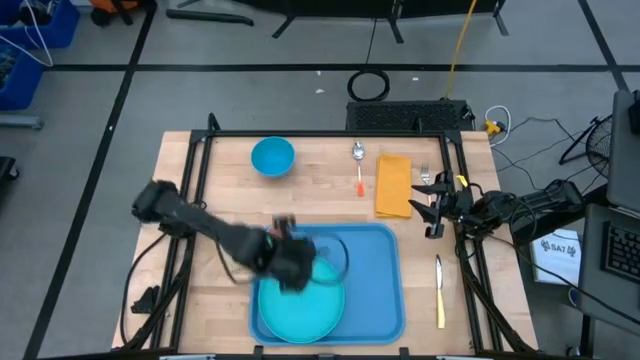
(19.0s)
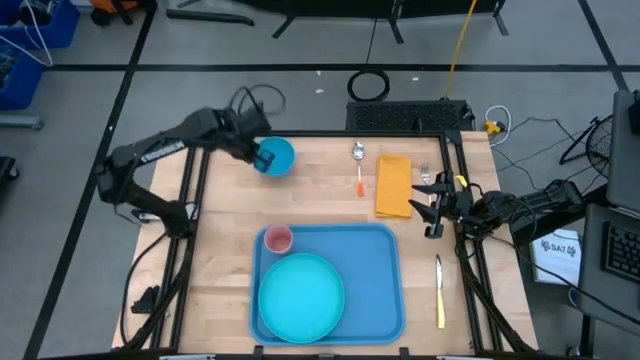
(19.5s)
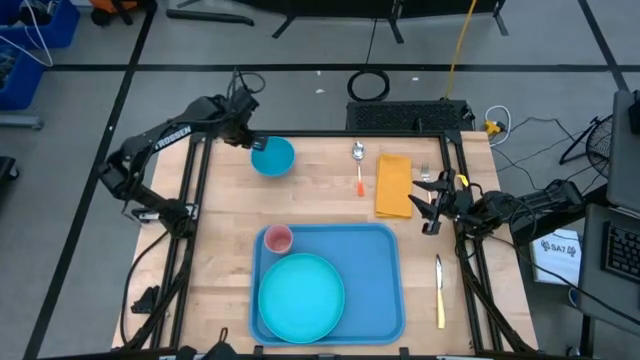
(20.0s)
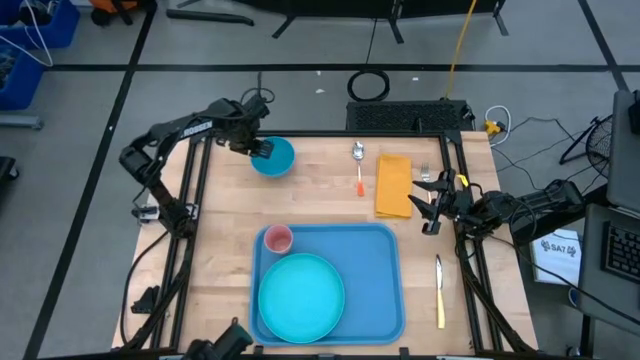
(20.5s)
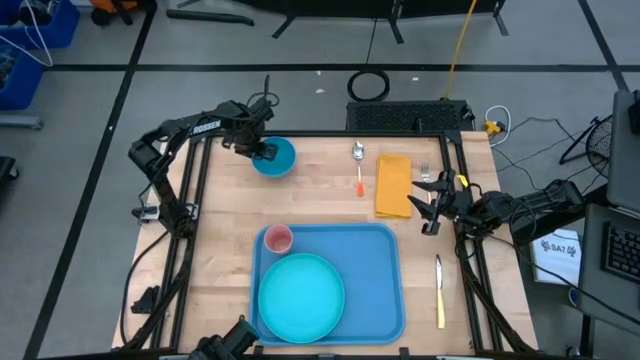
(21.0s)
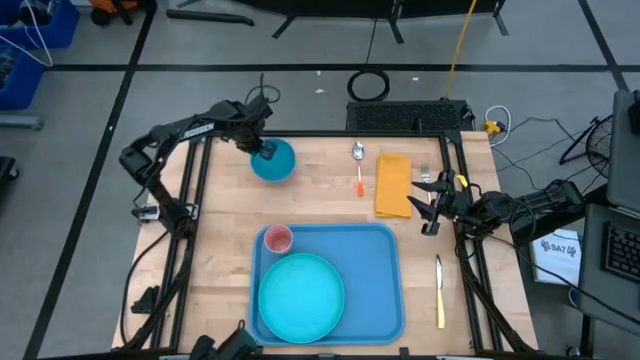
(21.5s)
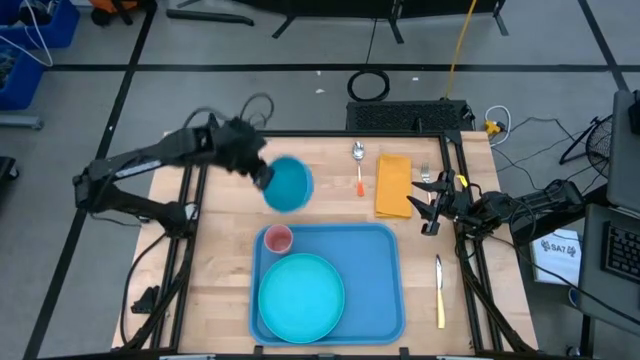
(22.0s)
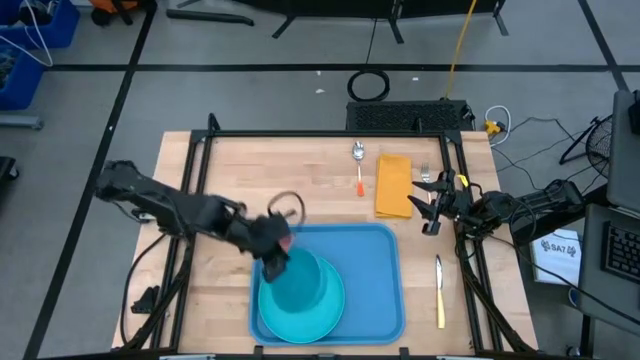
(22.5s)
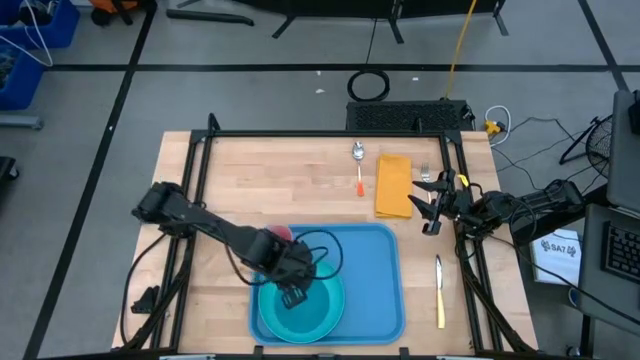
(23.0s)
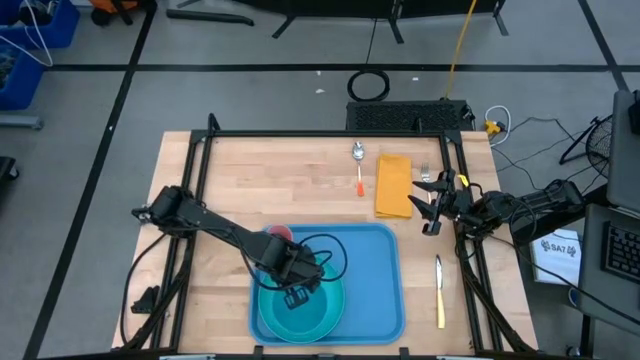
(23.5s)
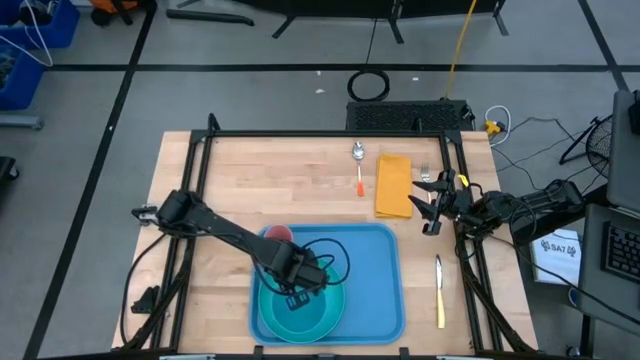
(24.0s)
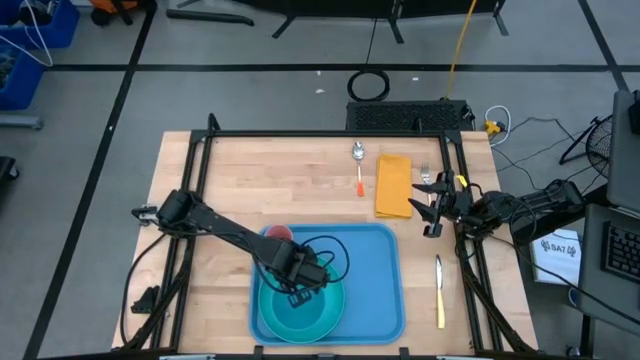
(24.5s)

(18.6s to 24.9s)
Task: Set up tray
Put the blue bowl on the light blue plate

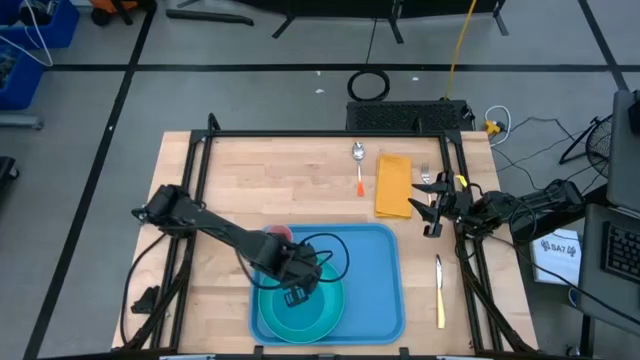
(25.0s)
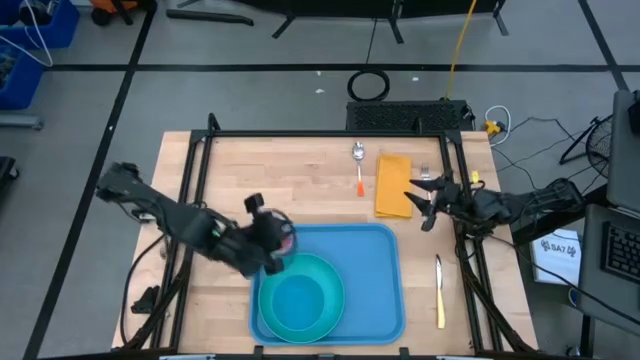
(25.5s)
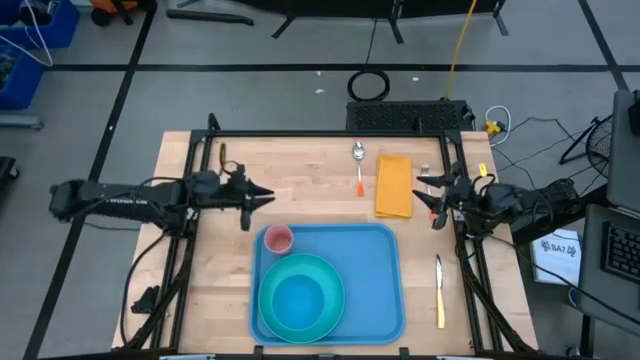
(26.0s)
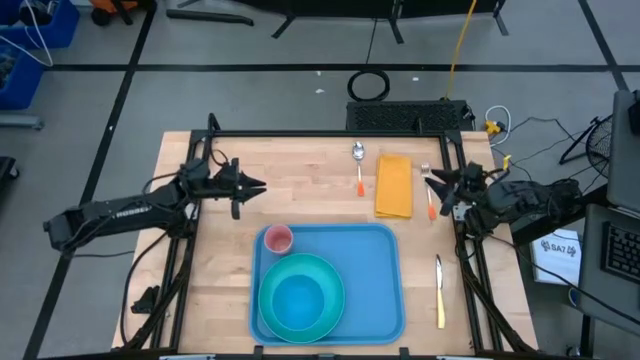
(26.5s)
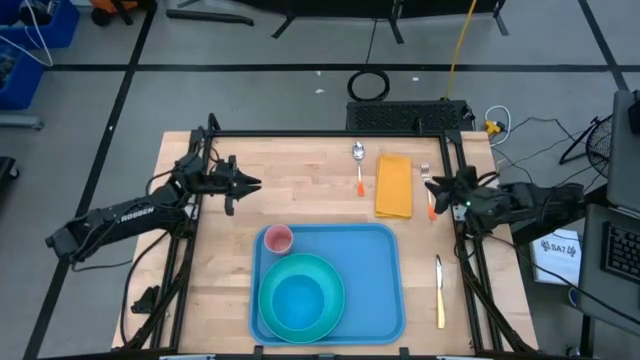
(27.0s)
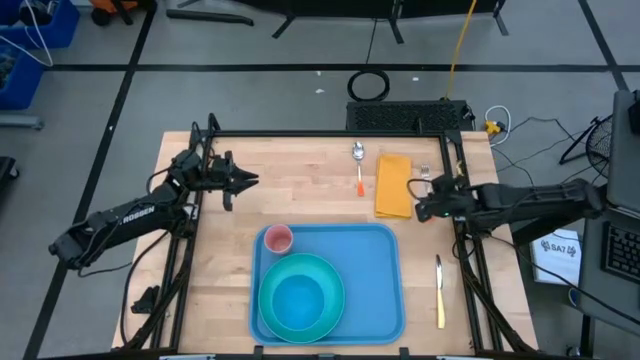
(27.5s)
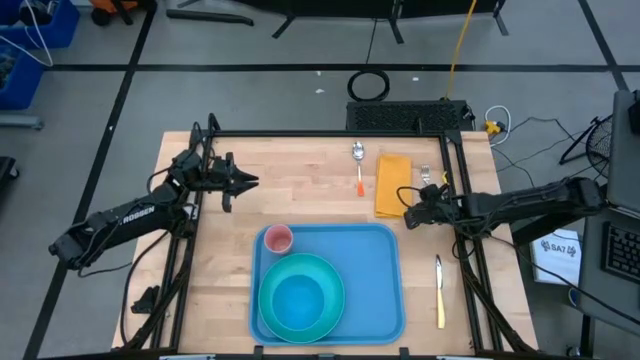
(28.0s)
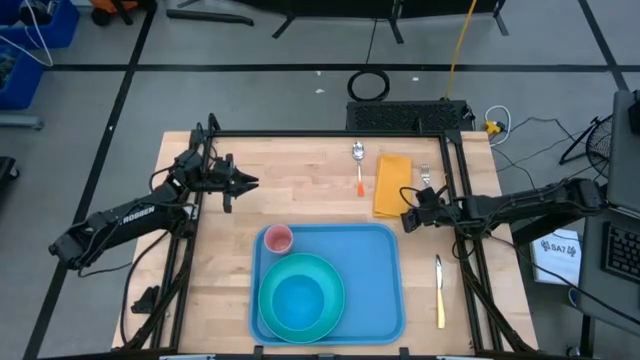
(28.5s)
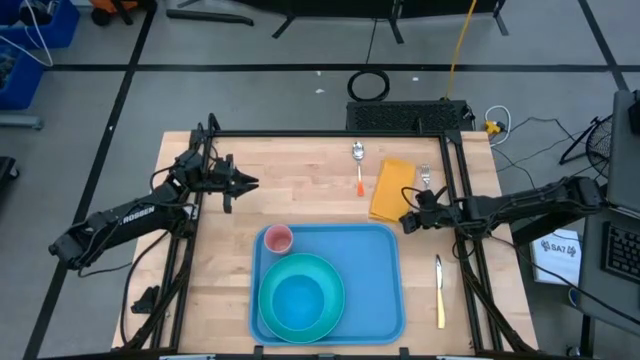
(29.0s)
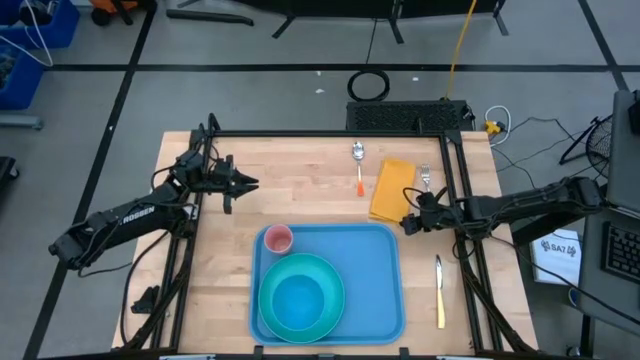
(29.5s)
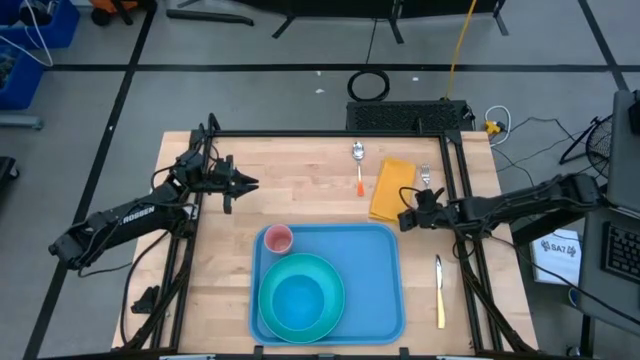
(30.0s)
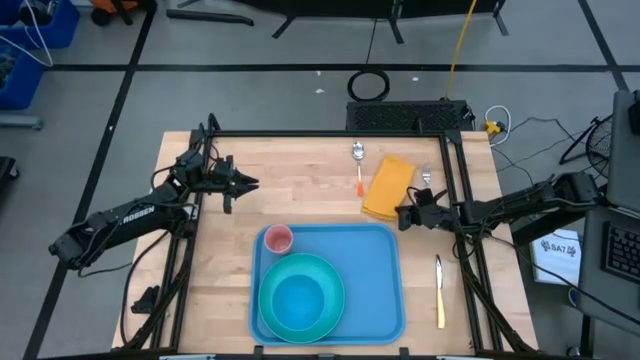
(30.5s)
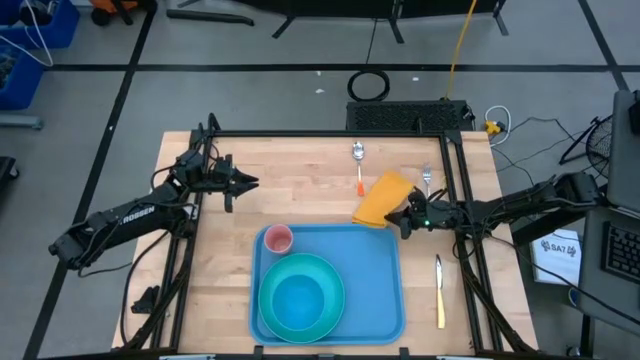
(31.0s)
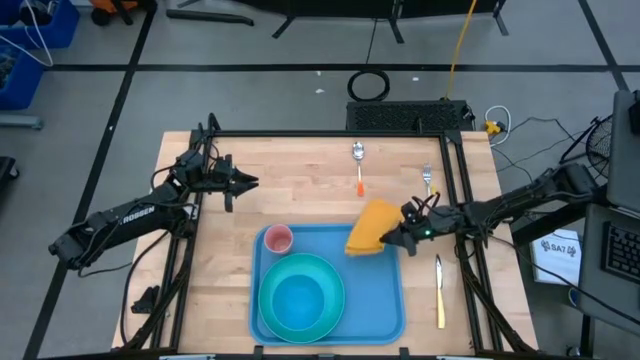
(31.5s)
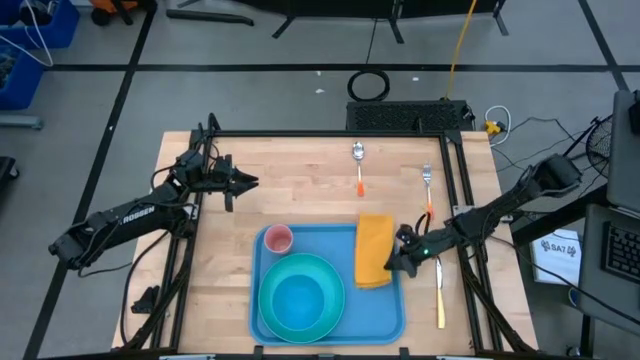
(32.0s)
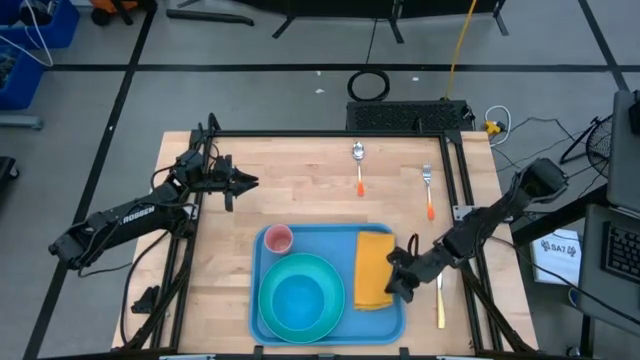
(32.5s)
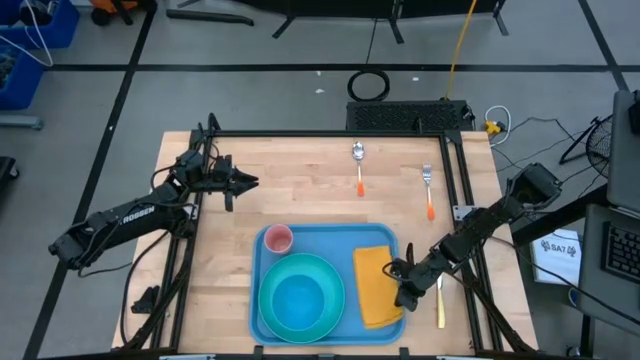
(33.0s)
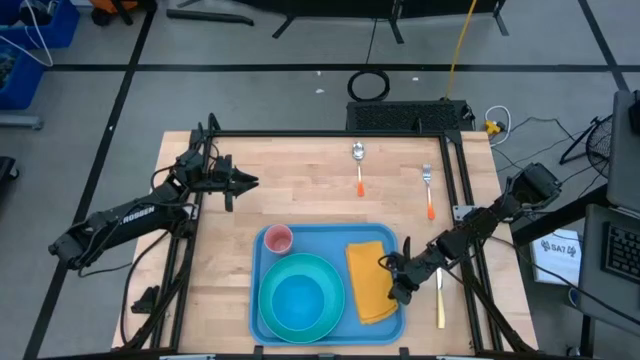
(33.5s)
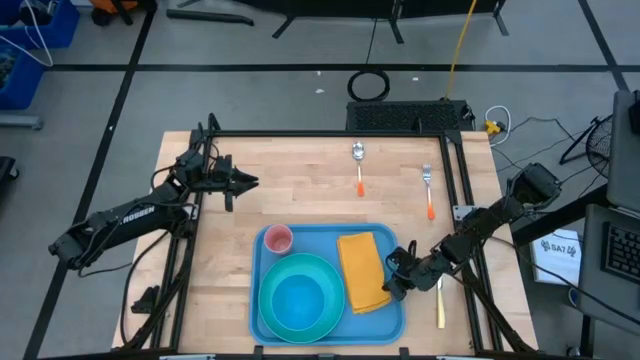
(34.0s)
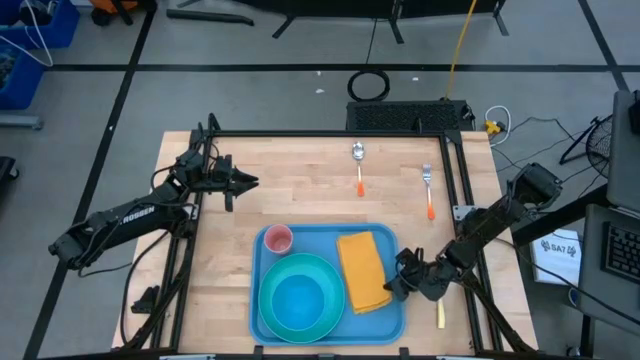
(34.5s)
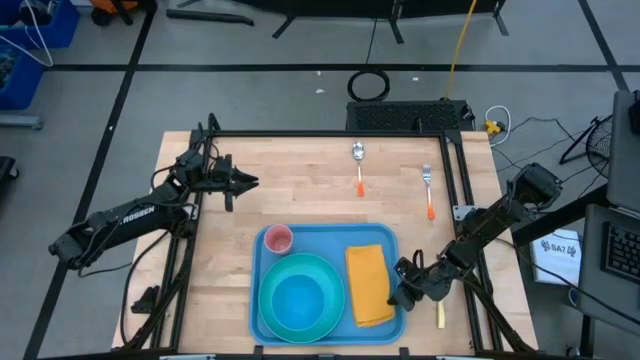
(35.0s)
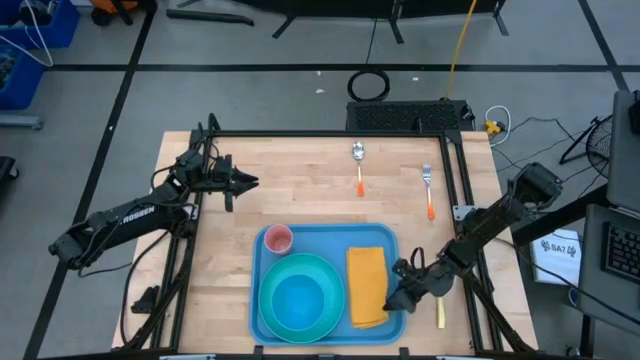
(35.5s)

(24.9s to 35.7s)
Put the yellow napkin on the blue tray to the right of the light blue plate

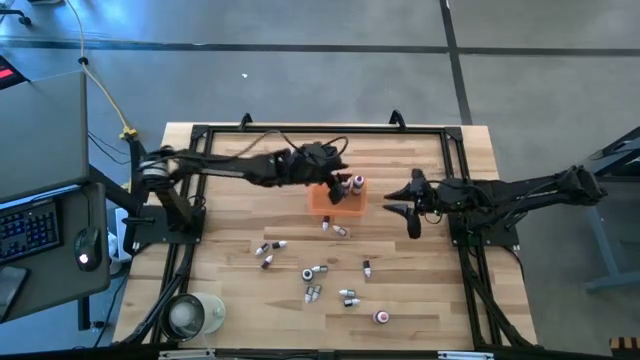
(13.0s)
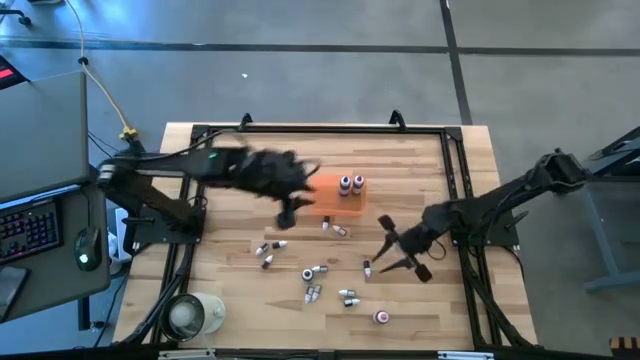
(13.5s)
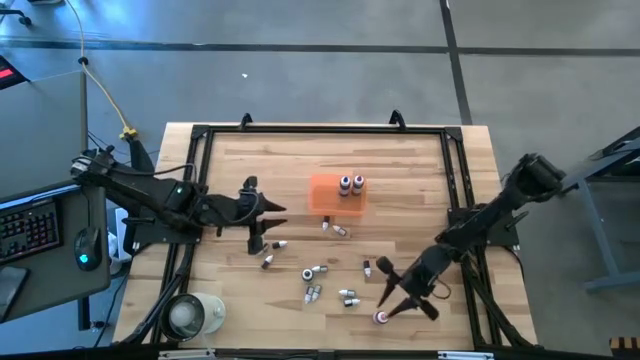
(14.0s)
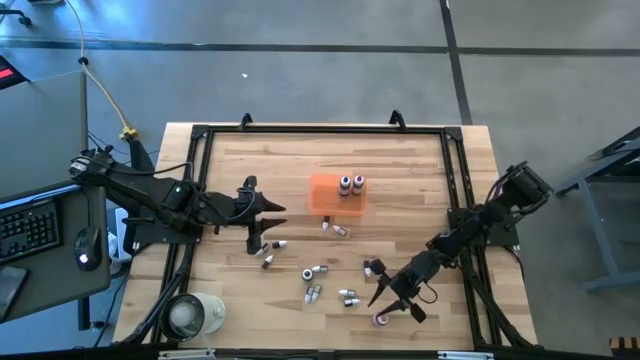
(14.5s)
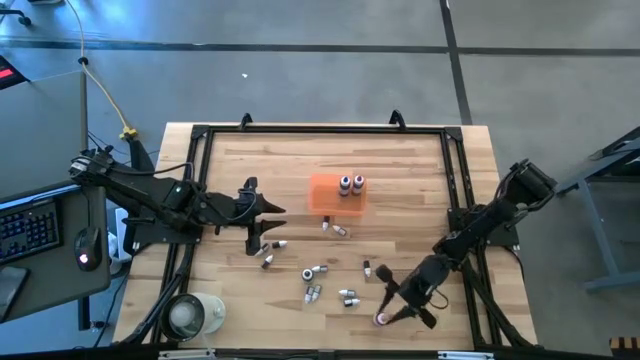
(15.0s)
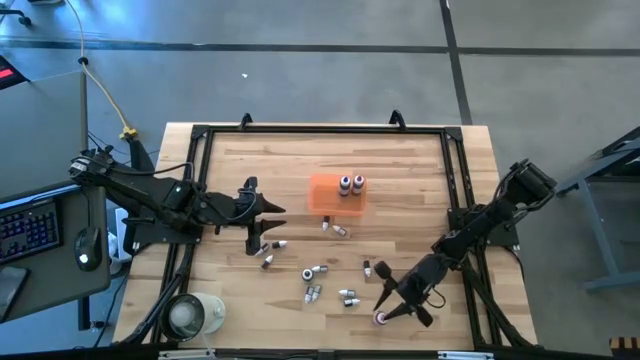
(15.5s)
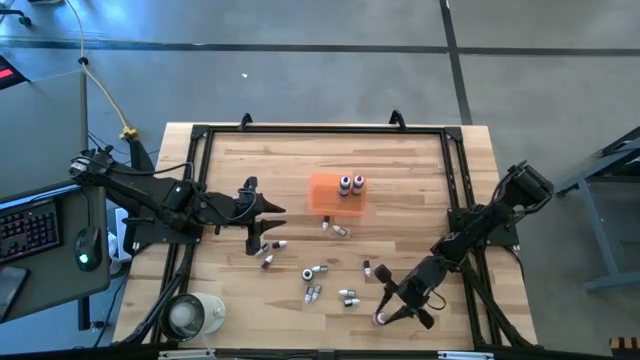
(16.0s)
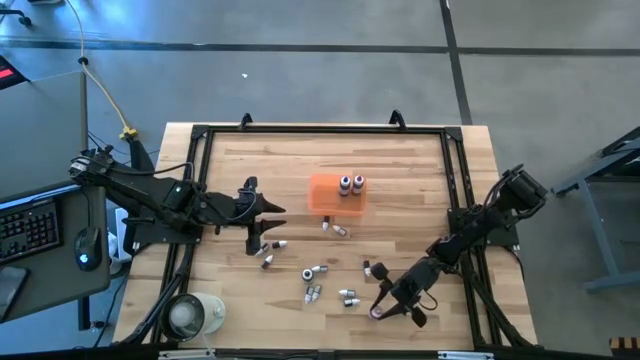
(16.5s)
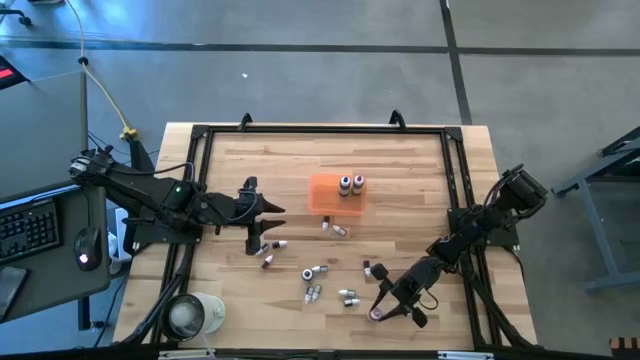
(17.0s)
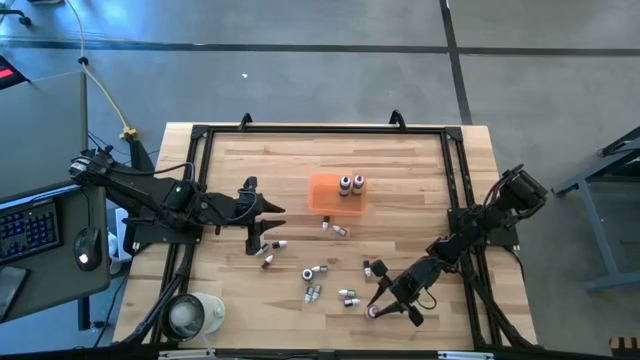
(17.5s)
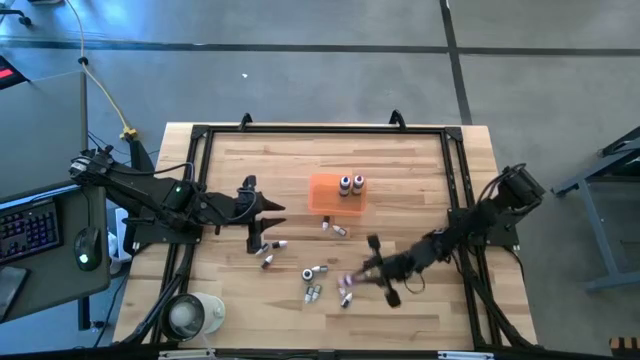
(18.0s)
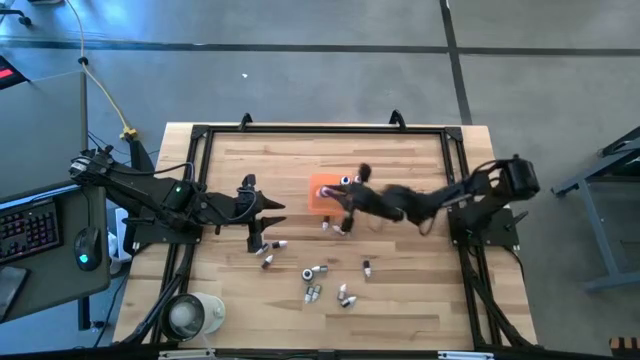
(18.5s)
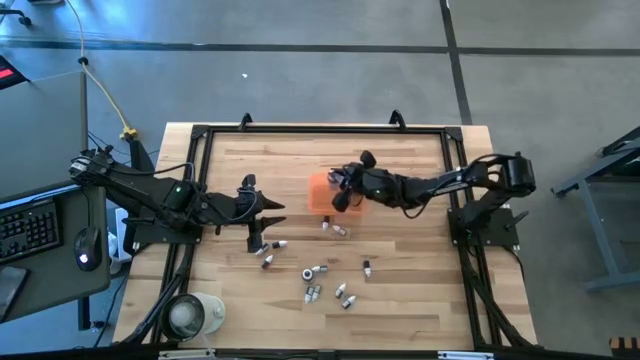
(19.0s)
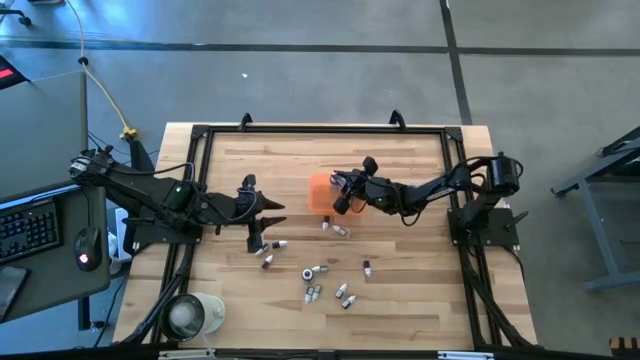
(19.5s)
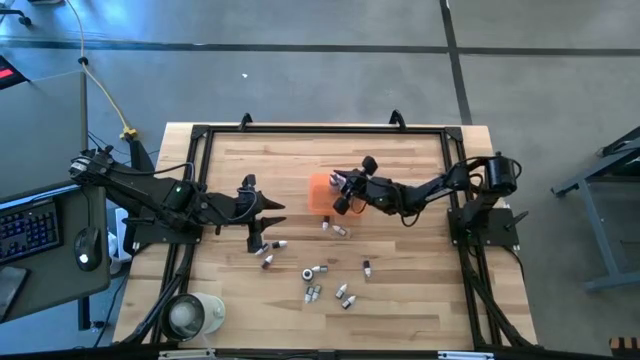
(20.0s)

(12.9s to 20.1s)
Task: Pick & Place food coloring
Put the large pink food coloring bottle into the orange bin
